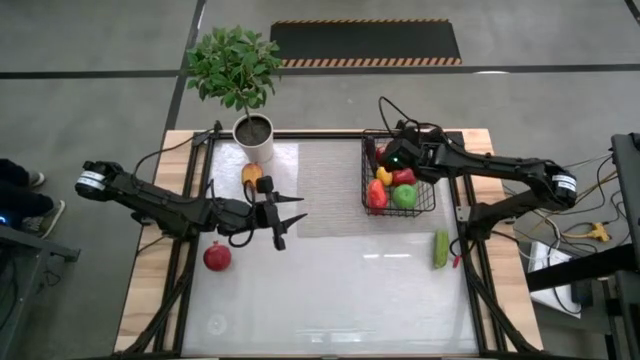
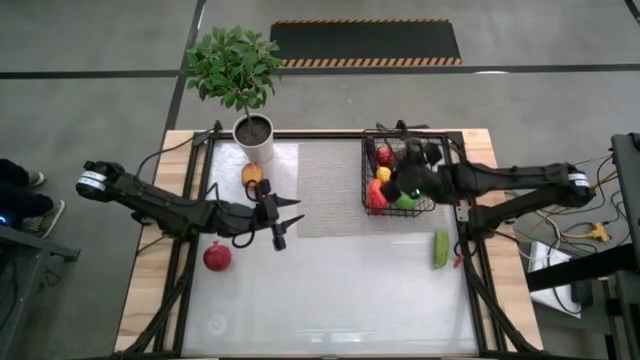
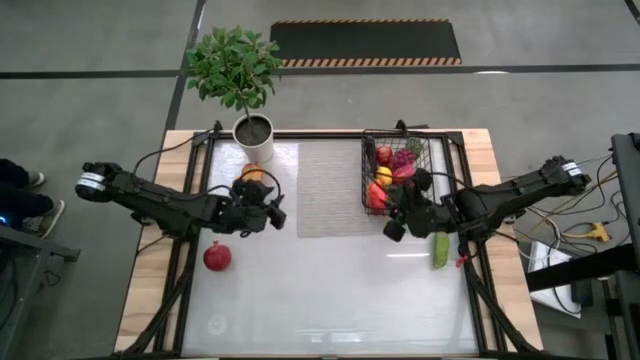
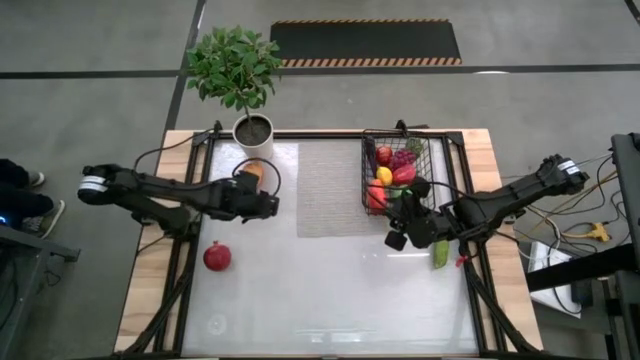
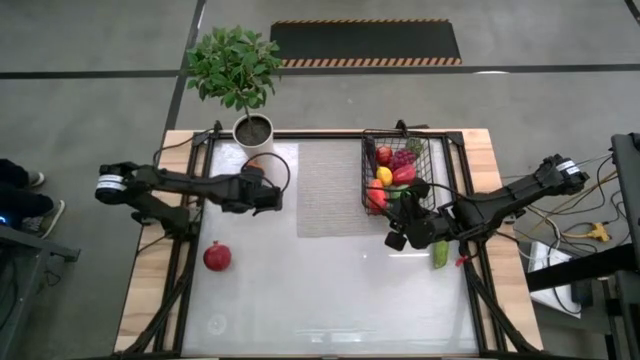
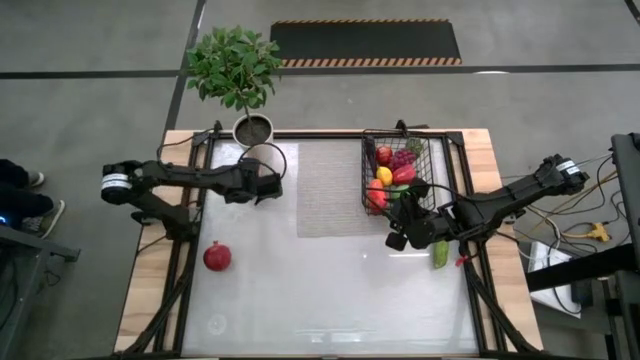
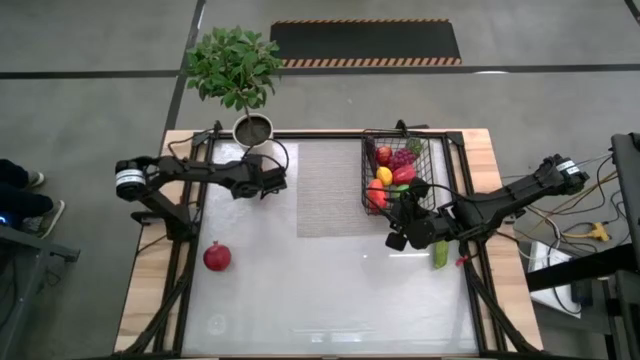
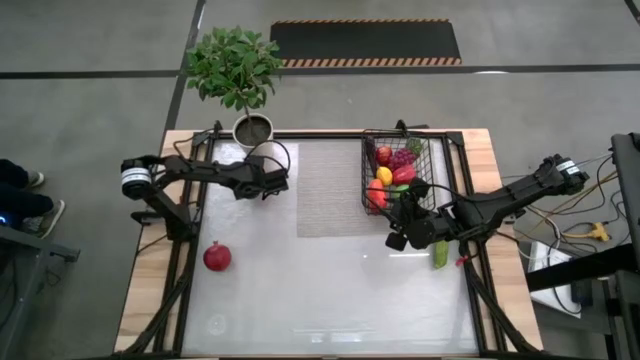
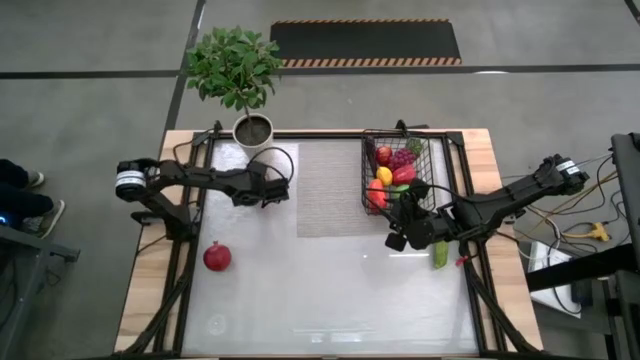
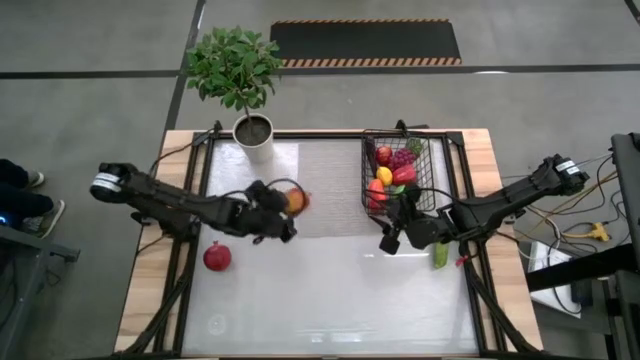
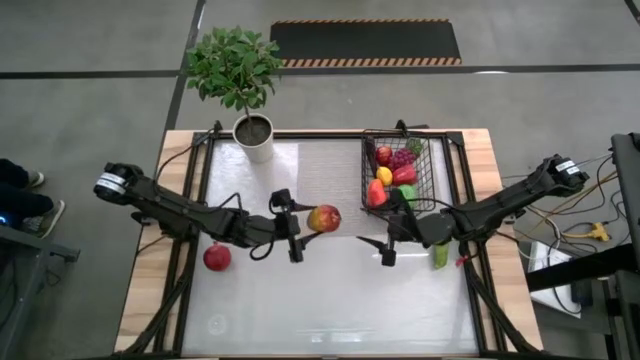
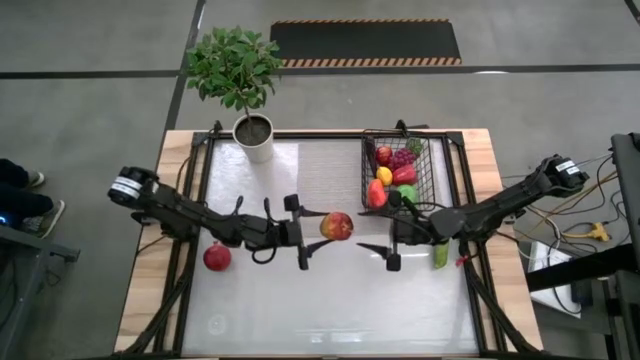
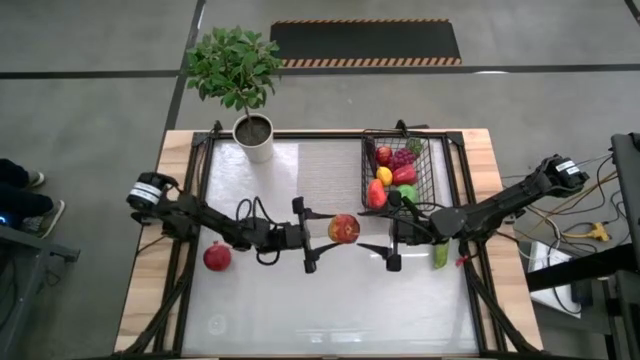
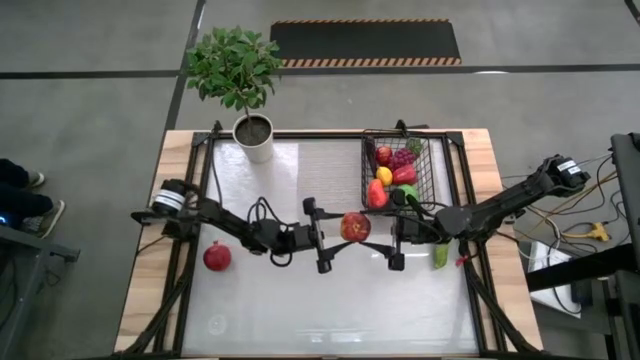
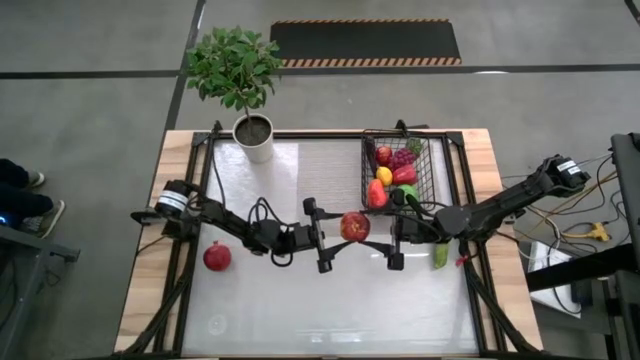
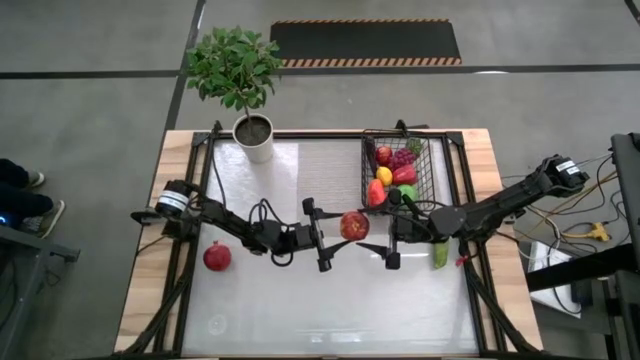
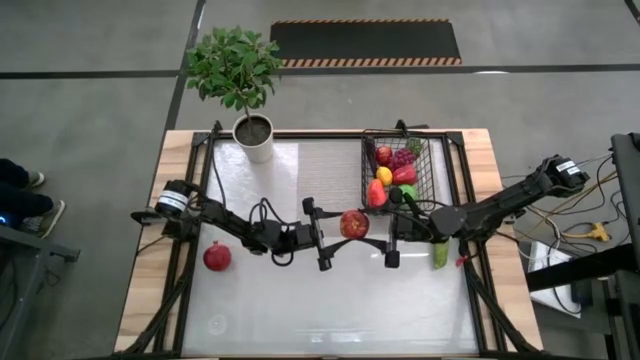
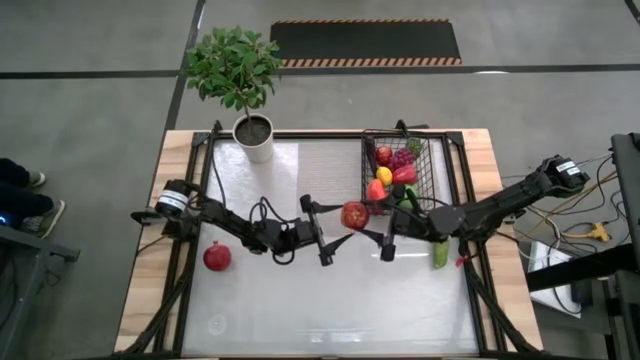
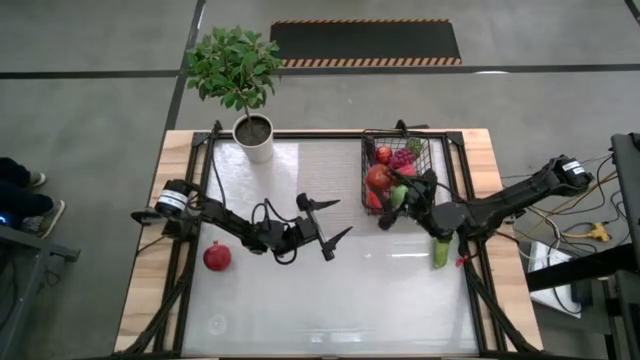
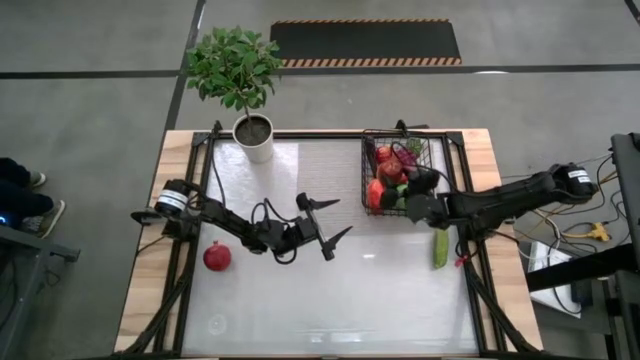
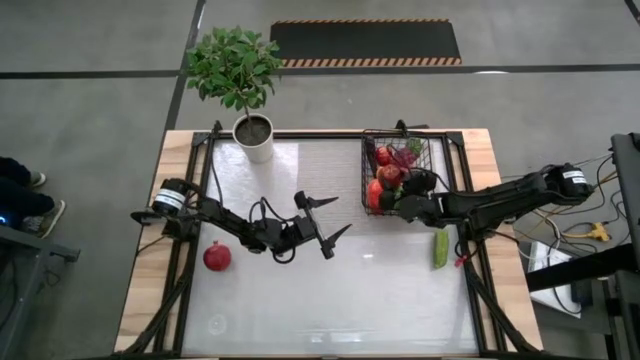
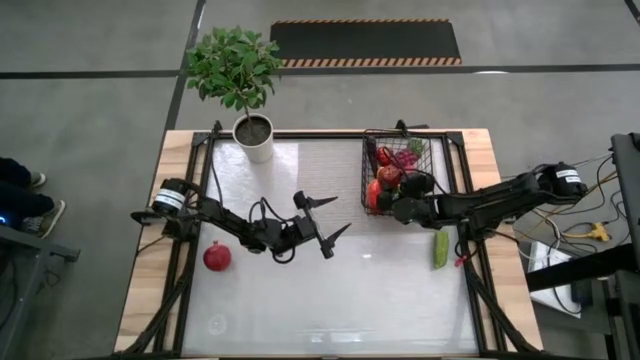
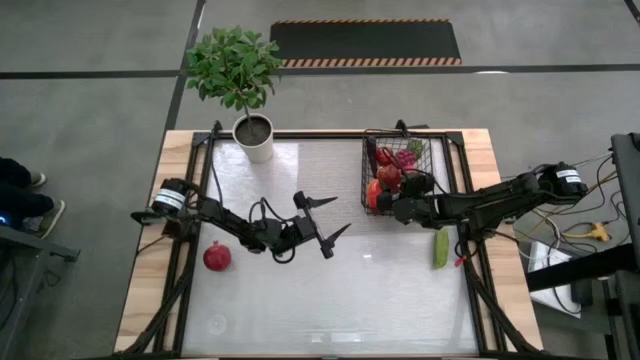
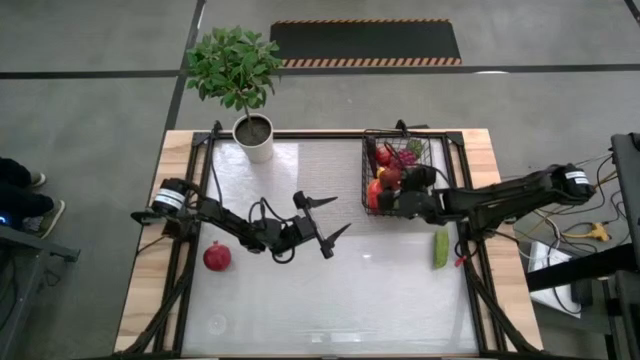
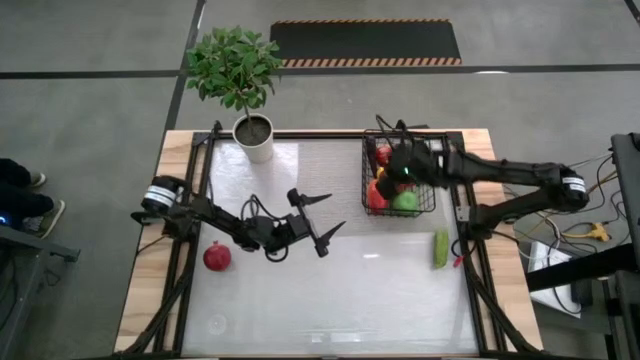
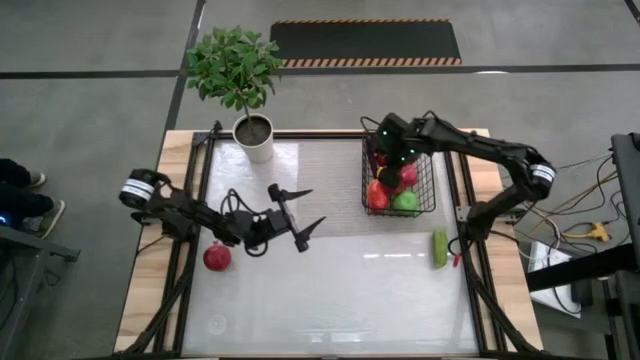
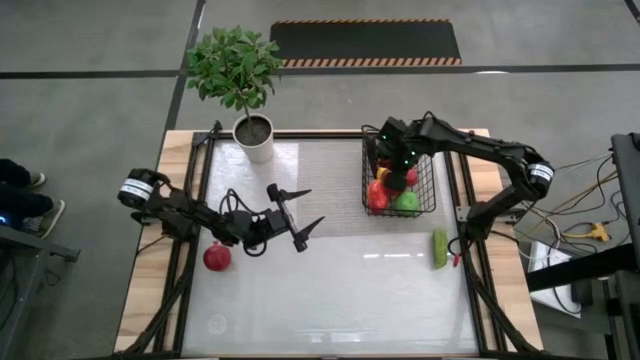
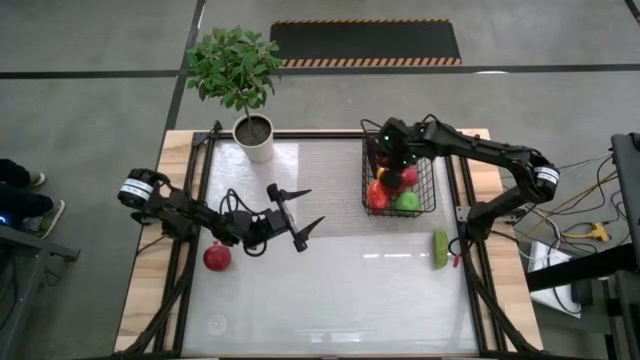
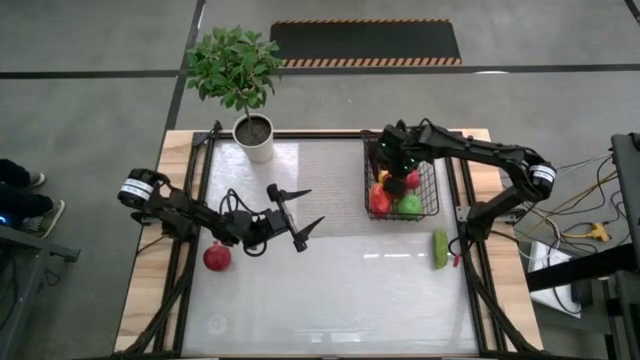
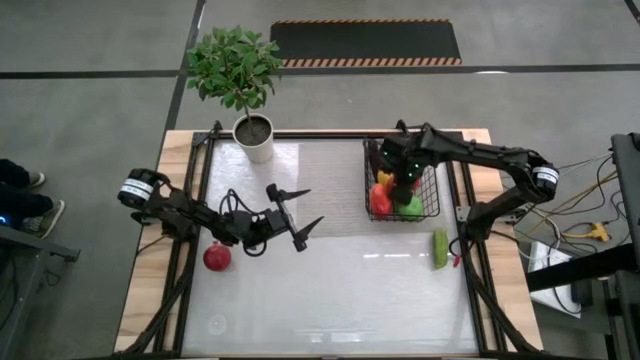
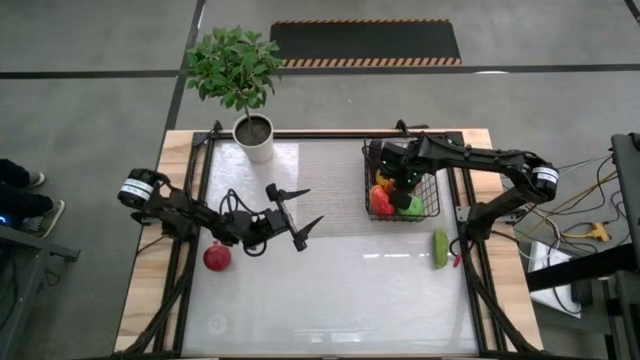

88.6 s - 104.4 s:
Task: Build produce basket
Put the yellow apple into the wire basket

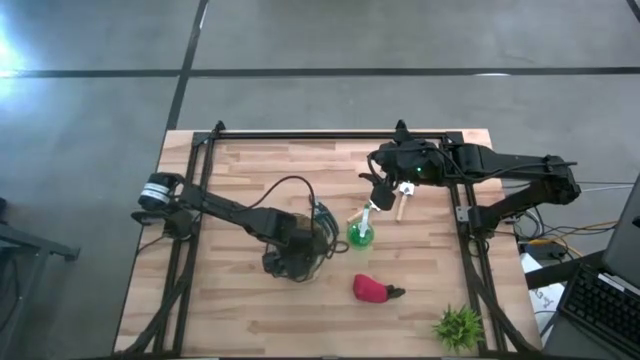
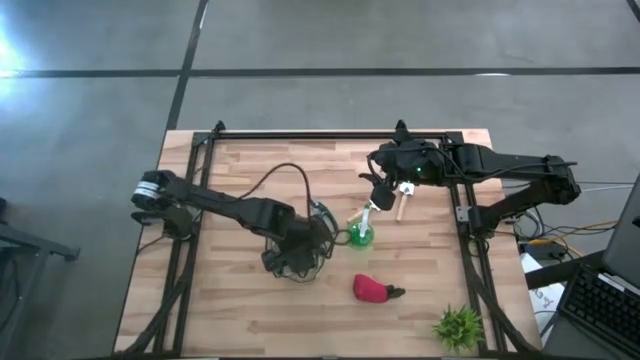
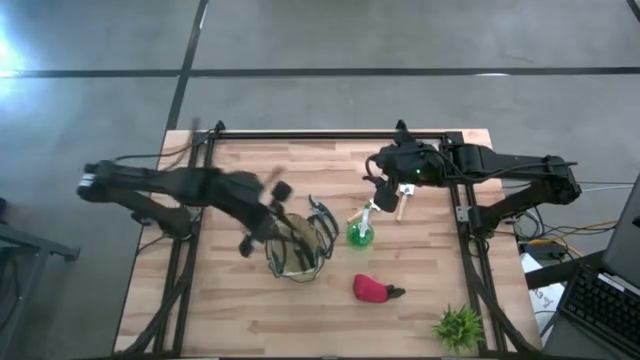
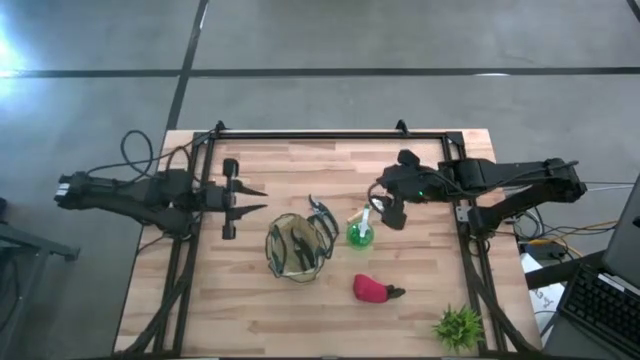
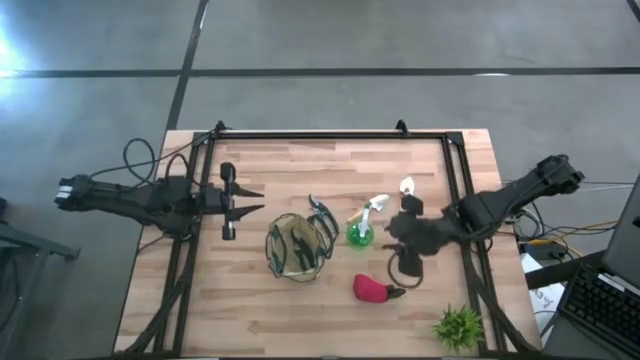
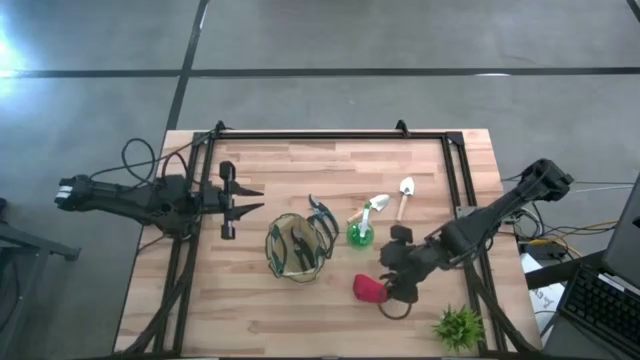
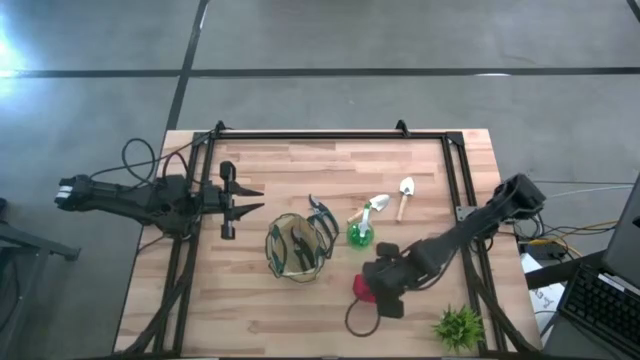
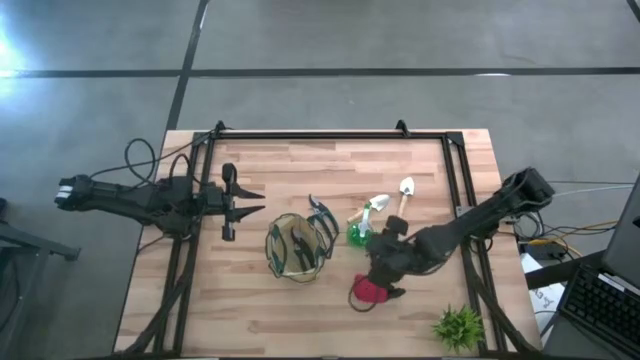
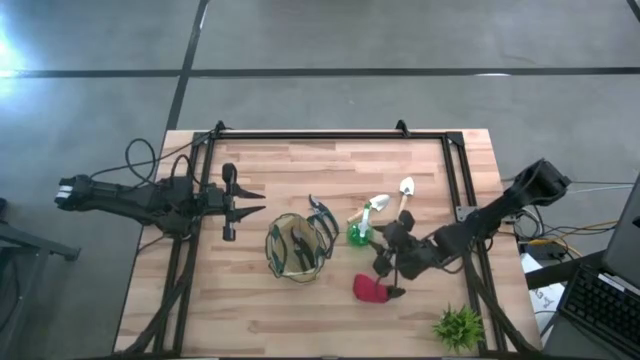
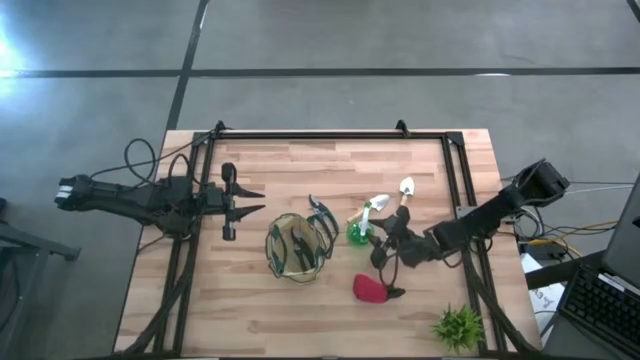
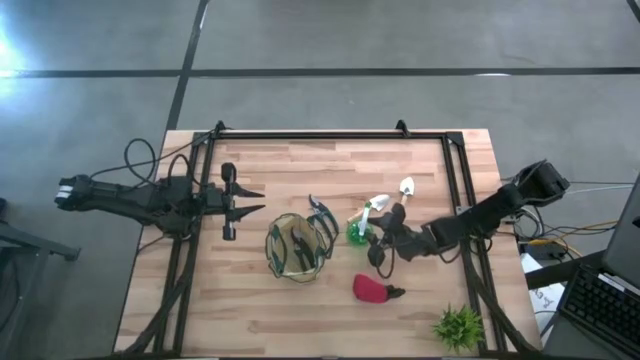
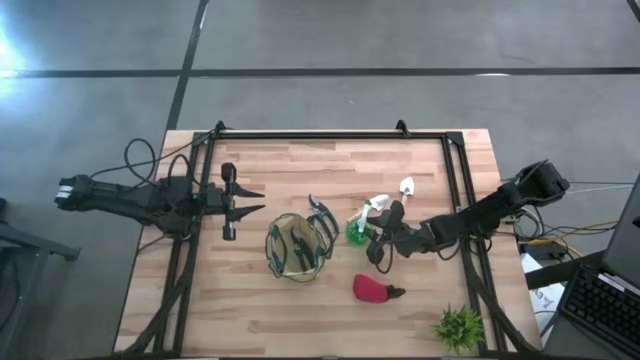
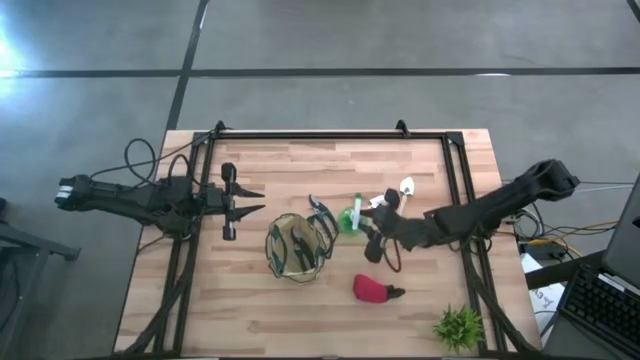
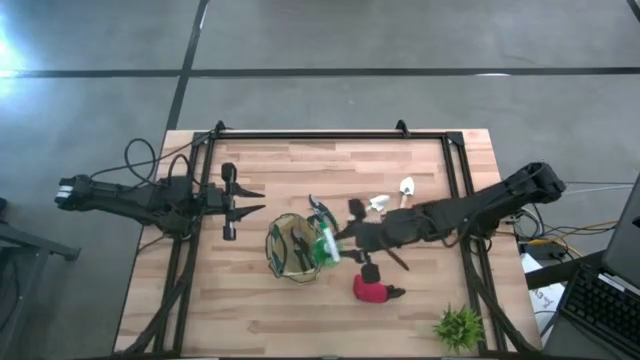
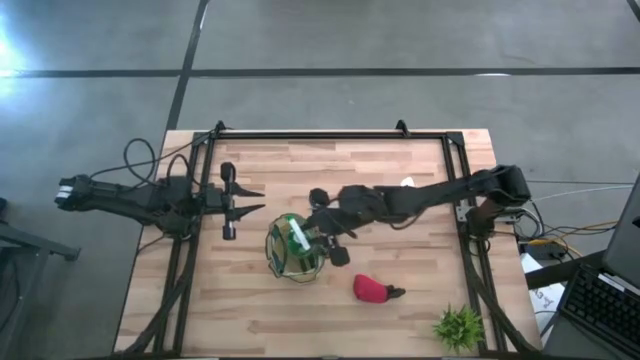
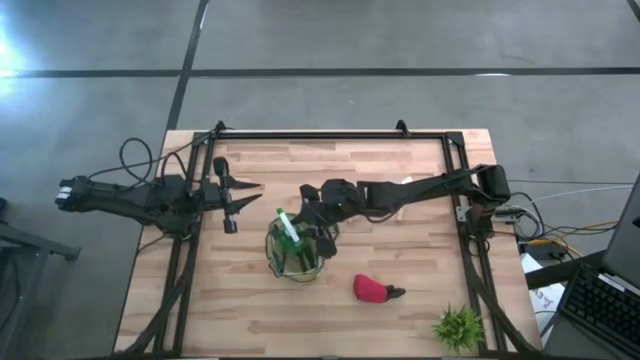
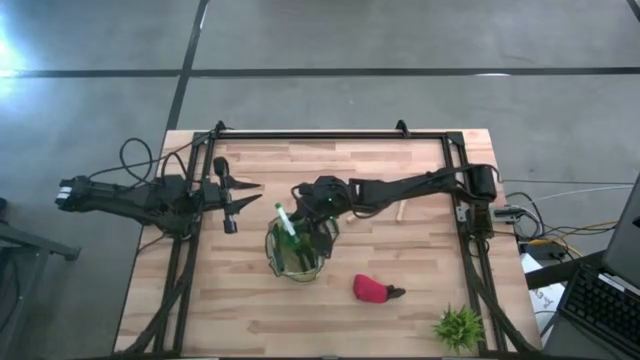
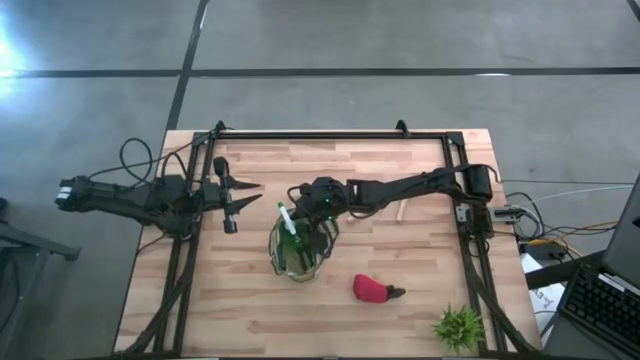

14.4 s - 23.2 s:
Task: Pick & Place Garden tools in Gardening bag
Put the green spray bottle into the gardening bag
